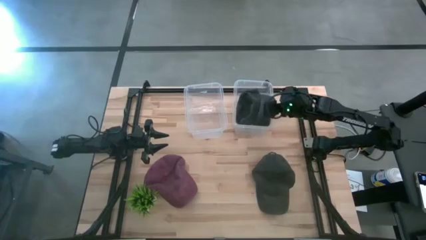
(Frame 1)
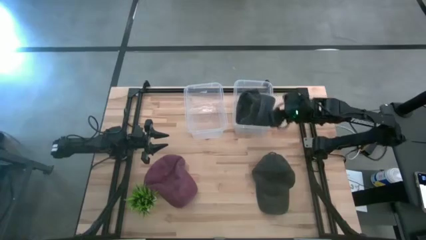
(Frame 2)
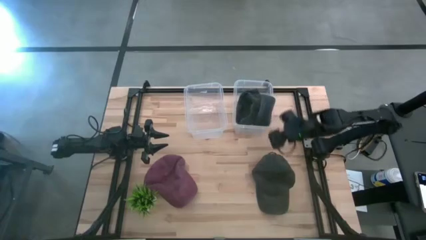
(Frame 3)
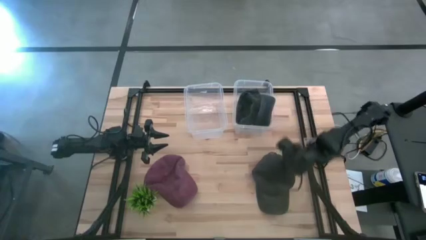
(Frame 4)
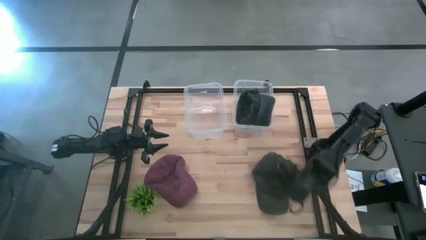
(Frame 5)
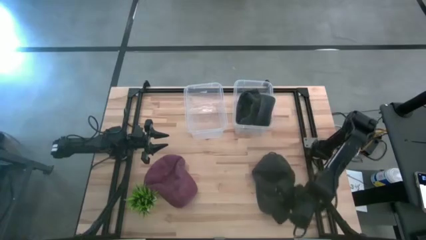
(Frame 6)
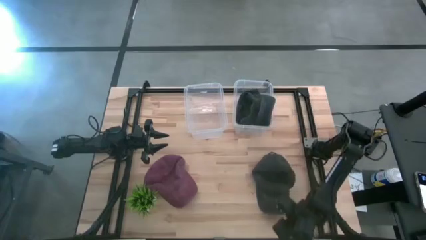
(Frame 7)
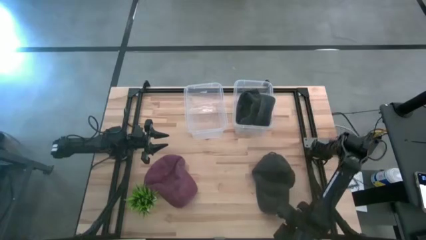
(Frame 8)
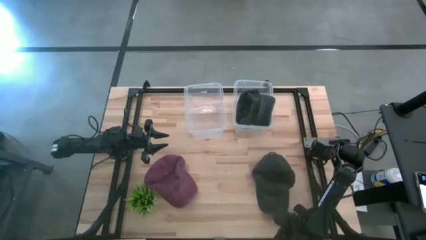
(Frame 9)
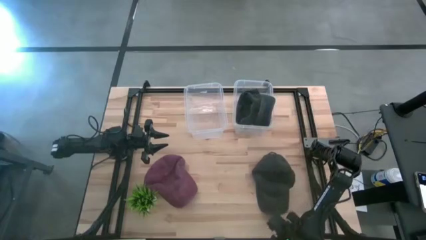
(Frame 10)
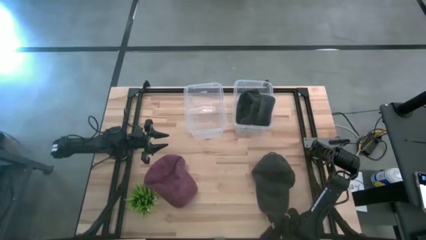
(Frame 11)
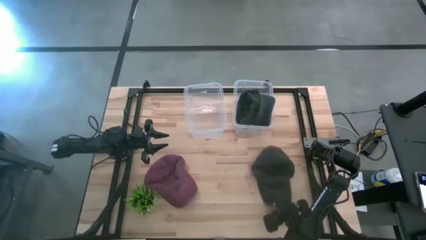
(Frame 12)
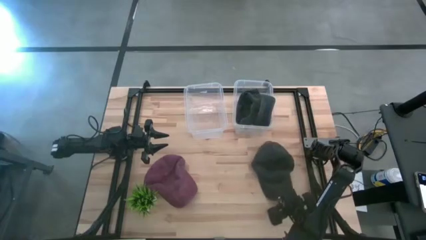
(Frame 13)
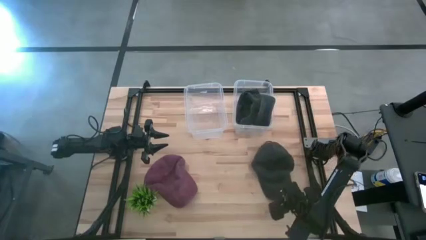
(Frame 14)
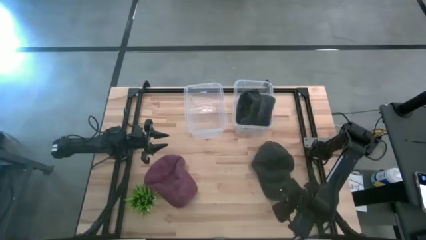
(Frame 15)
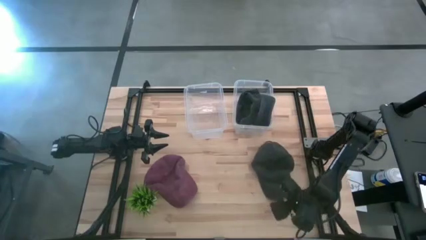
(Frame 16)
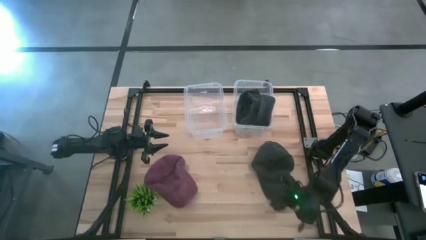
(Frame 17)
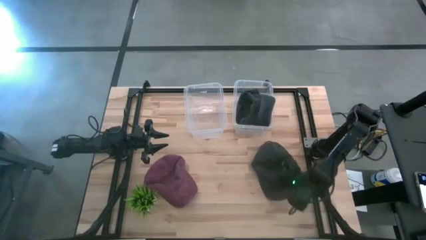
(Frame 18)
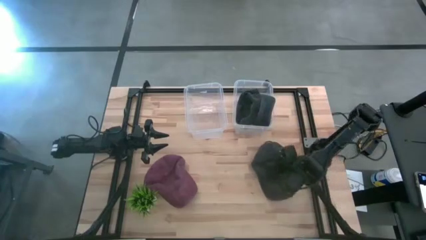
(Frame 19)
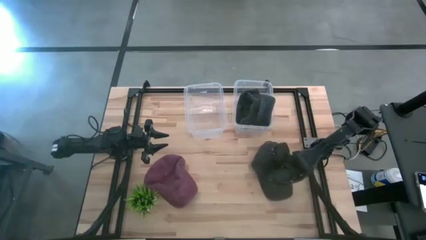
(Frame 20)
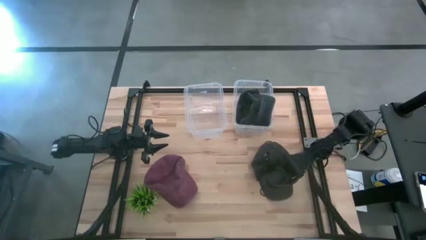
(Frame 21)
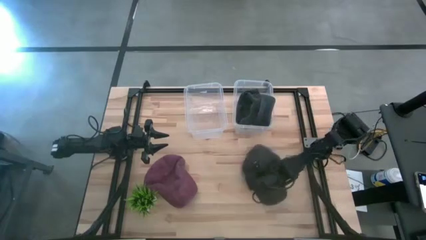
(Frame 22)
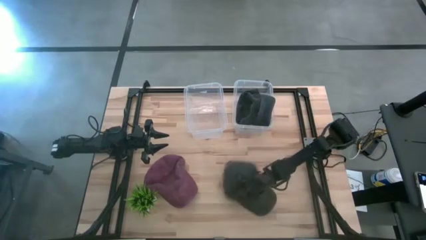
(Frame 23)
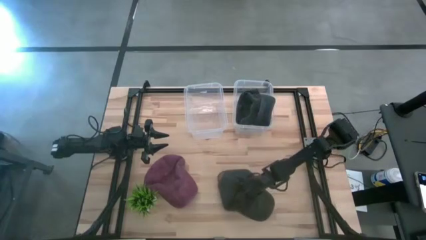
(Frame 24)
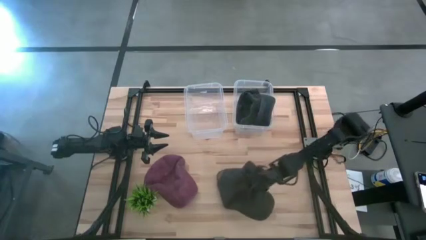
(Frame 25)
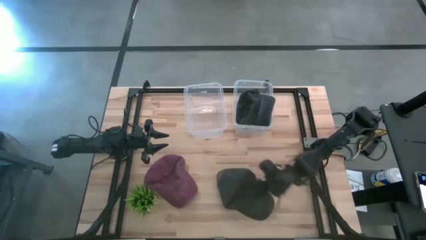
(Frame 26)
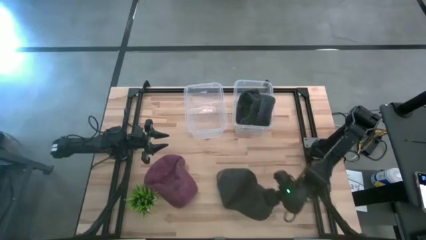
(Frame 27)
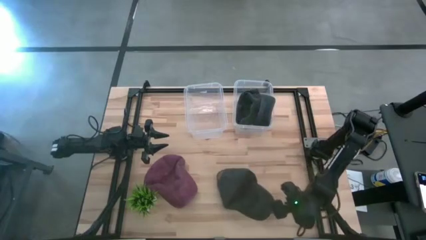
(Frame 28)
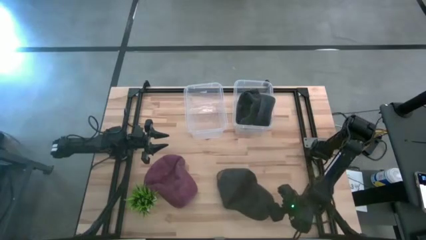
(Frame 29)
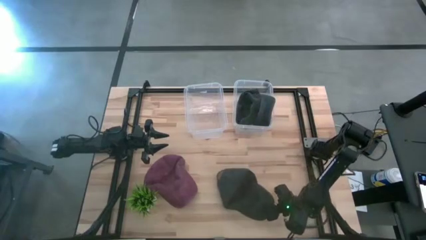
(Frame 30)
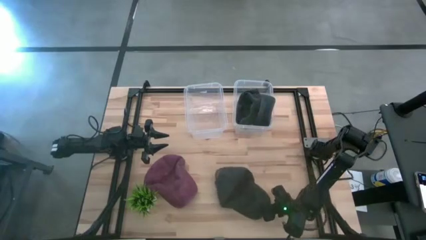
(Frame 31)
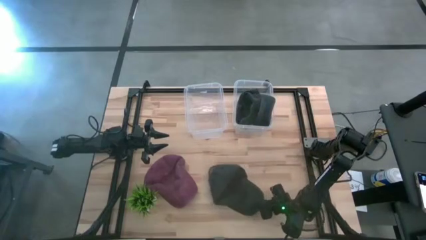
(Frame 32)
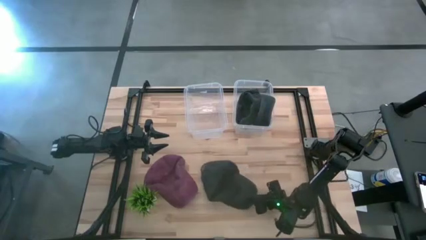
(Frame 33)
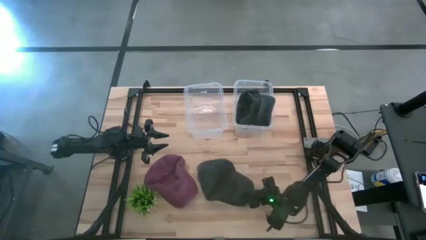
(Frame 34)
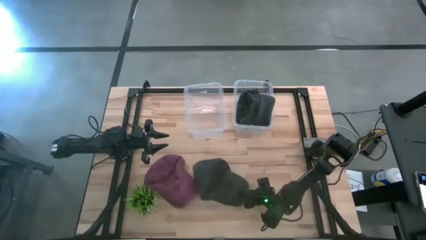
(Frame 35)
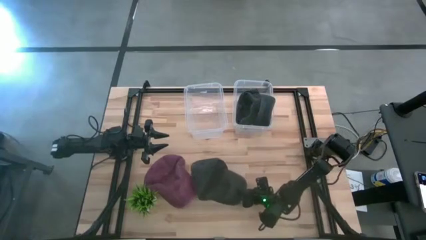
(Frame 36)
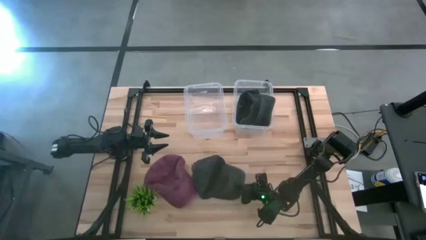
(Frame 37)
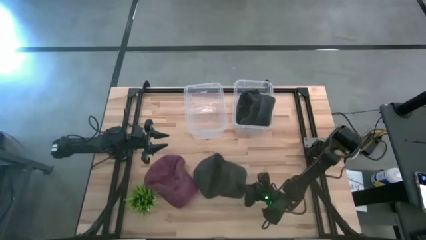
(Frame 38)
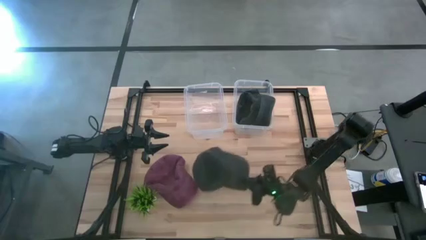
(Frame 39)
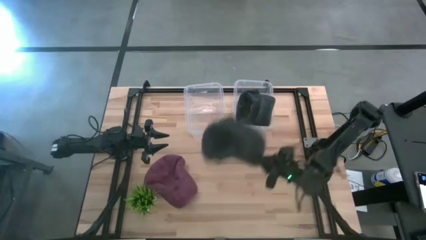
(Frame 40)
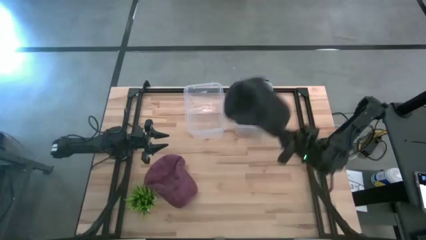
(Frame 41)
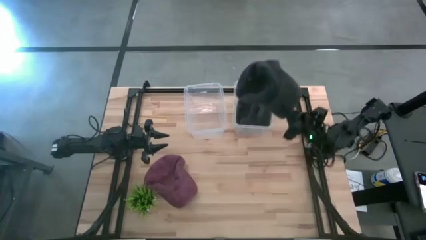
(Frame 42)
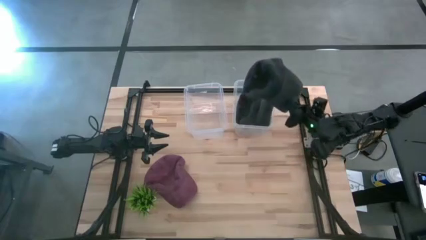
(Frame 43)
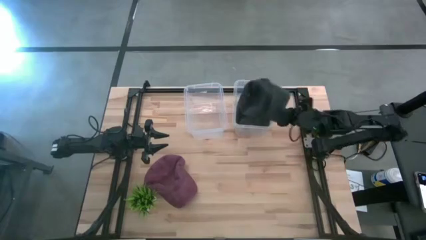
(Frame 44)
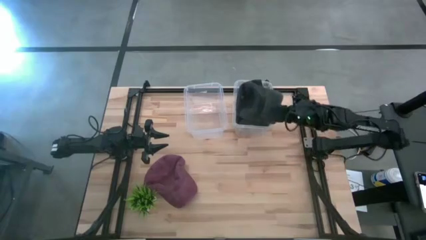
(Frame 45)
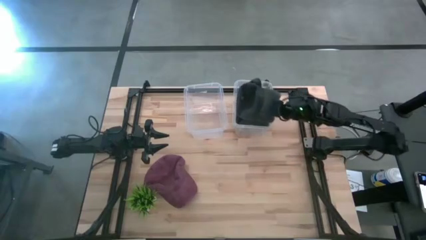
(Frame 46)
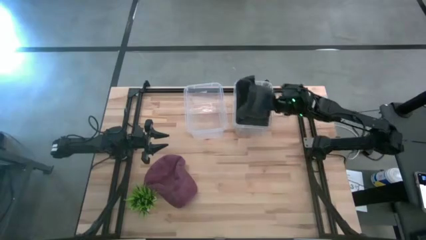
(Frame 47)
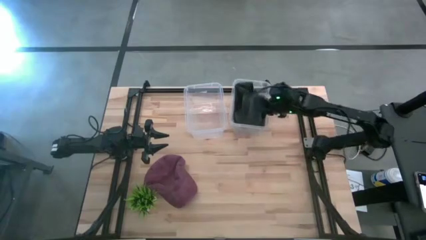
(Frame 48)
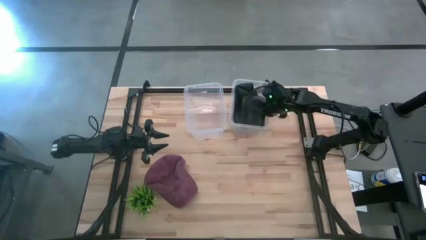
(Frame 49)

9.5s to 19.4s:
Task: Pick & Place hat
Put the black cap into the right transparent bin

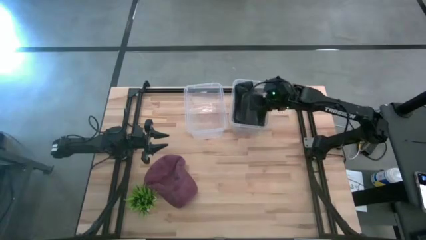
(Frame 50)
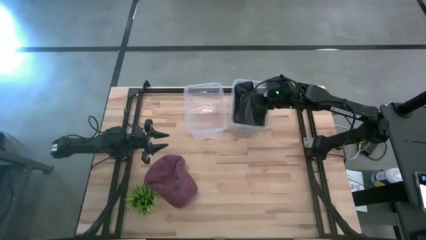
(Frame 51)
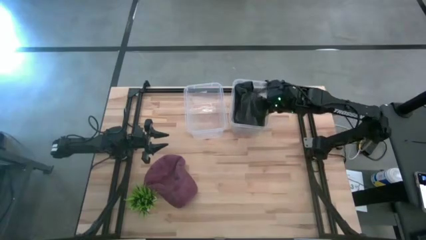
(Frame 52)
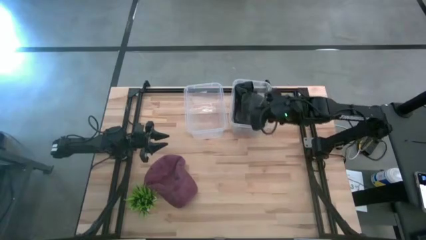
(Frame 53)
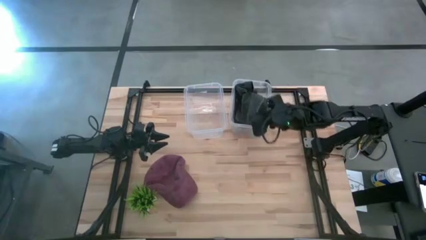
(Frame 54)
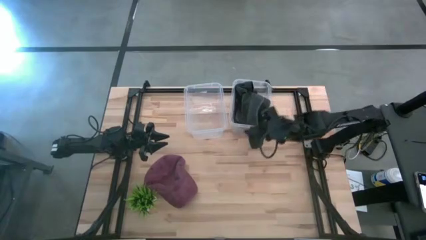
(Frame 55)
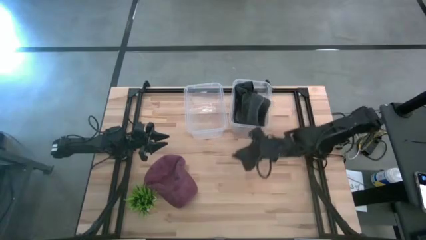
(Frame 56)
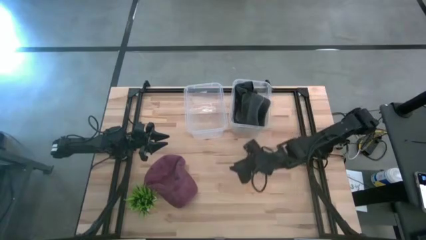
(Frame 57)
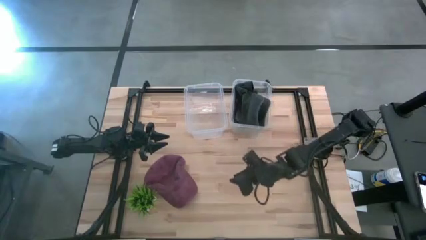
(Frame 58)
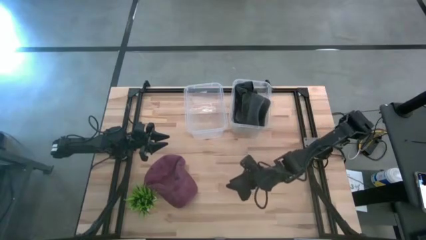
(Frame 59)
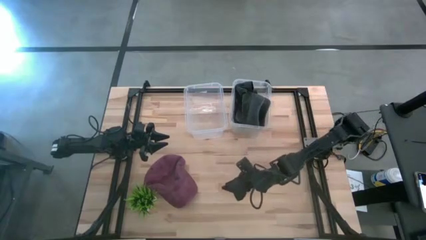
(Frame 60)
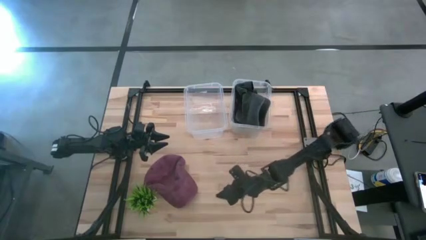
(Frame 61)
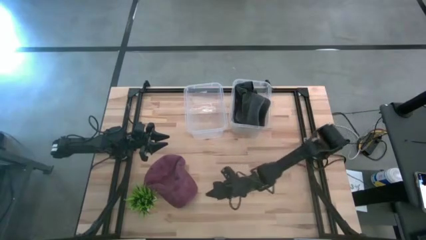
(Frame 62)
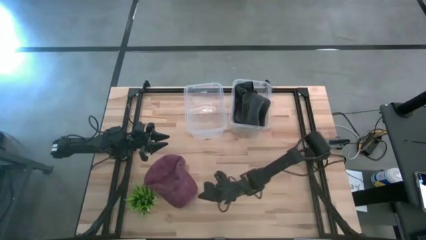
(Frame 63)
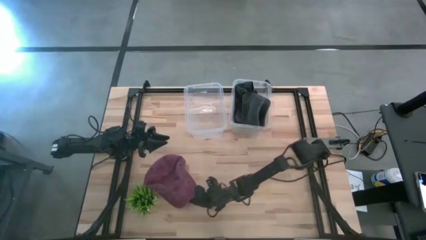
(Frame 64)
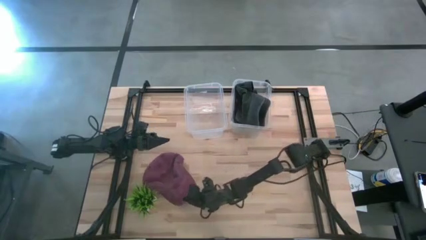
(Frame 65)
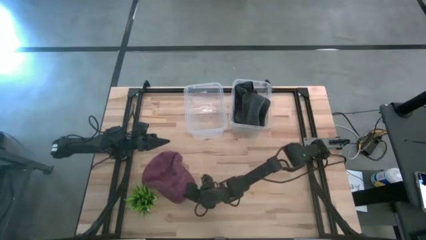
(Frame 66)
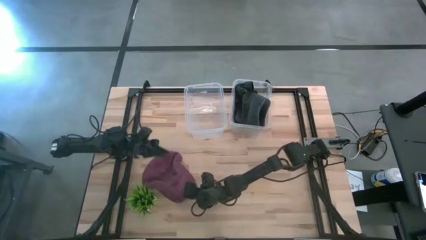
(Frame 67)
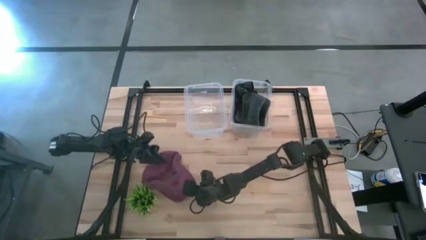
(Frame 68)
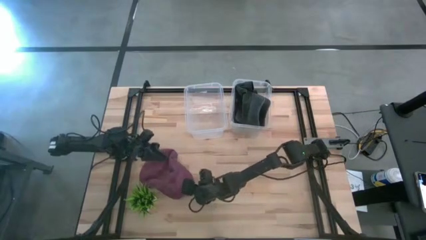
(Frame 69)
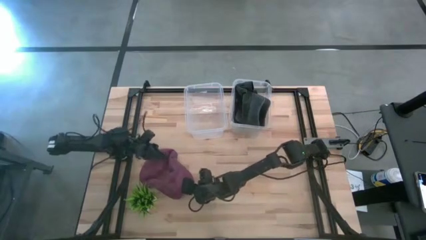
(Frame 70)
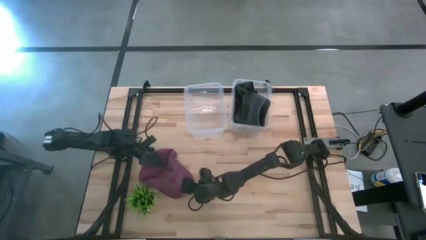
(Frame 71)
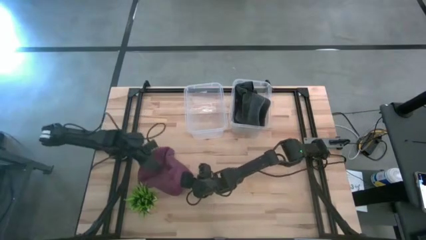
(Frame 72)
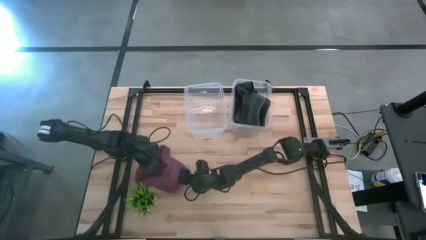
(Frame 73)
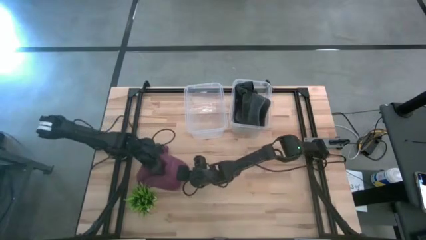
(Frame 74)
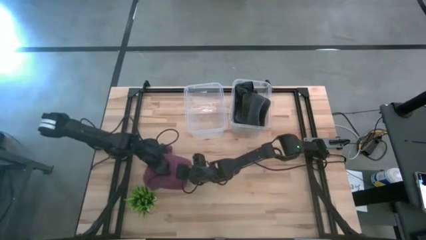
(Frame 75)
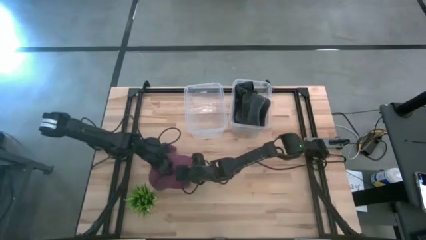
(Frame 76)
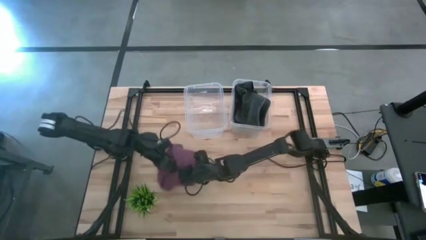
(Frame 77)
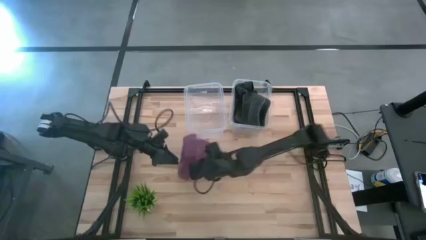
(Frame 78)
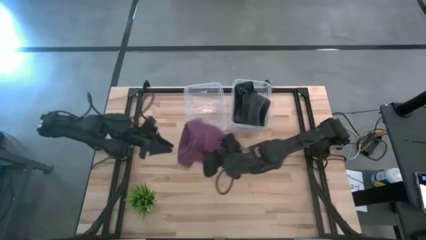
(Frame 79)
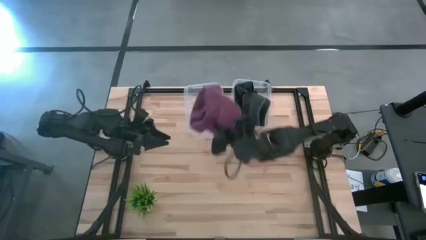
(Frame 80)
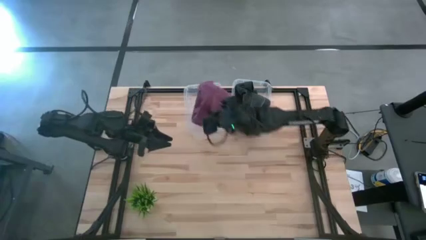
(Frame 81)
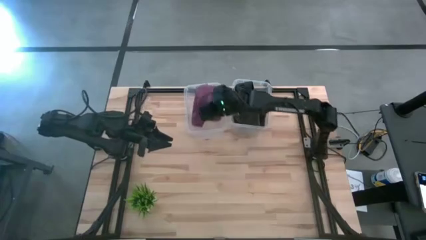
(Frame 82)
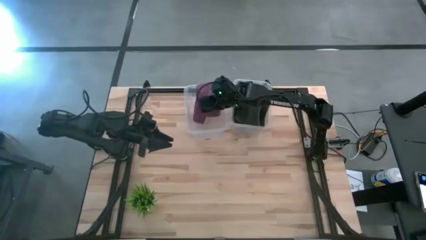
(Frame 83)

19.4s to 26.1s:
Put the red cap into the left transparent bin
